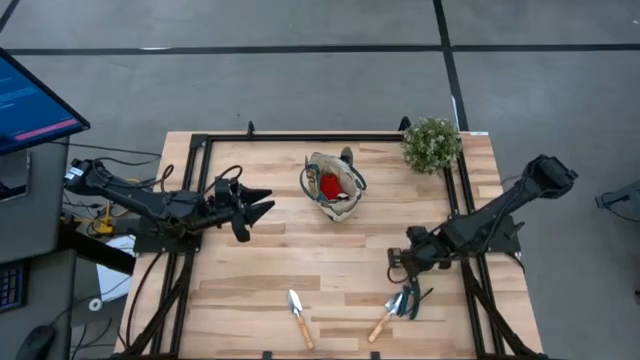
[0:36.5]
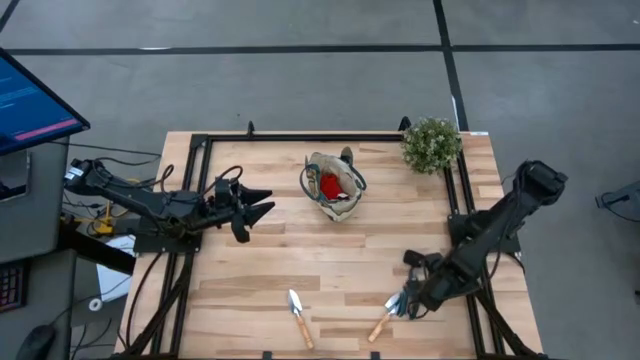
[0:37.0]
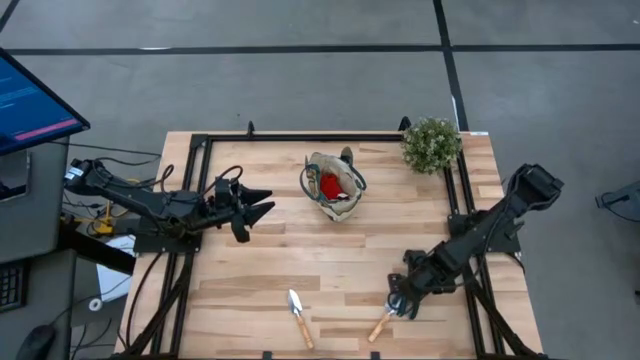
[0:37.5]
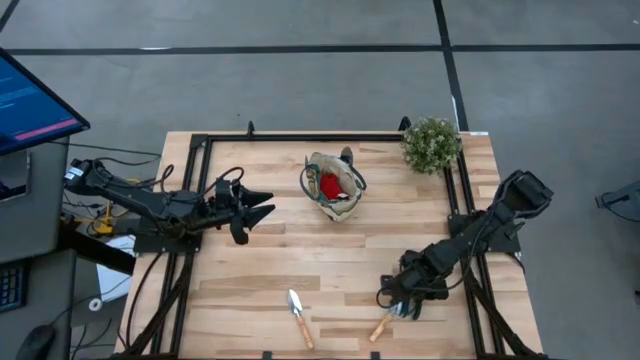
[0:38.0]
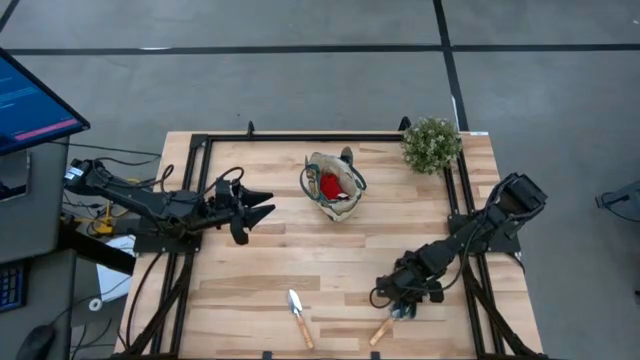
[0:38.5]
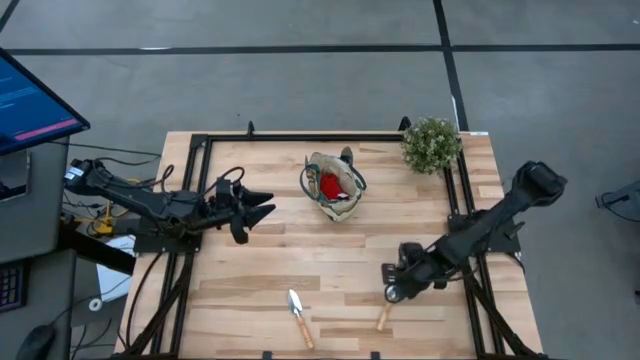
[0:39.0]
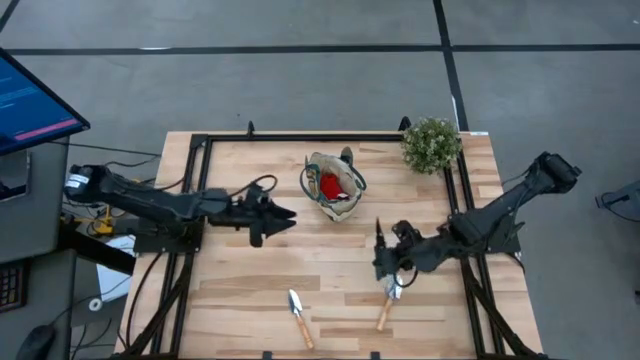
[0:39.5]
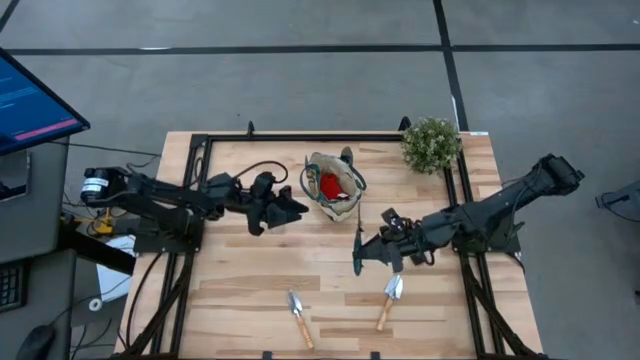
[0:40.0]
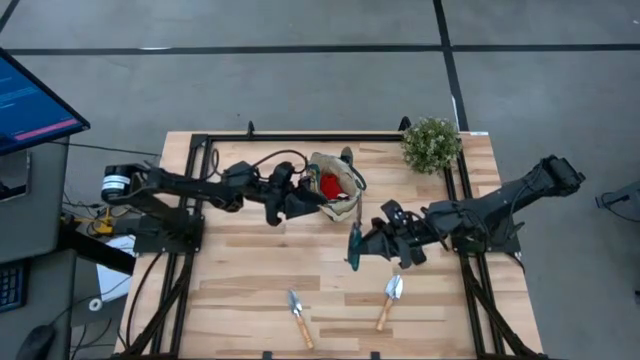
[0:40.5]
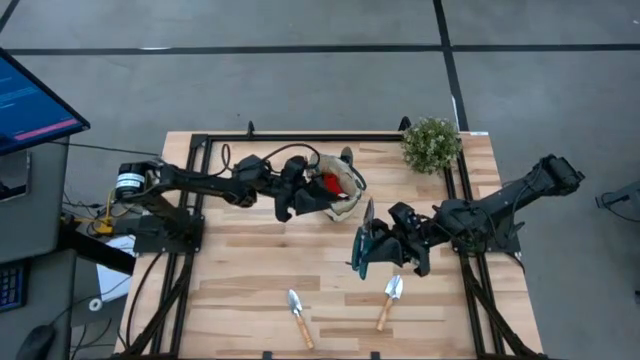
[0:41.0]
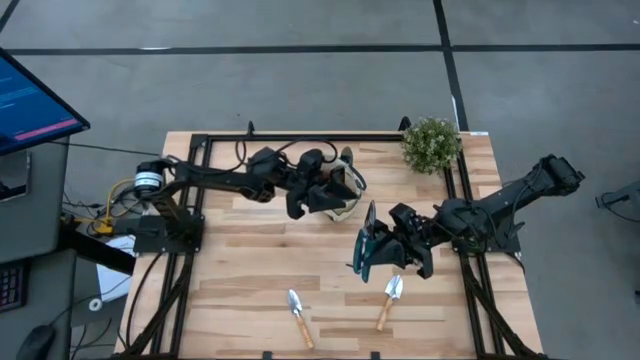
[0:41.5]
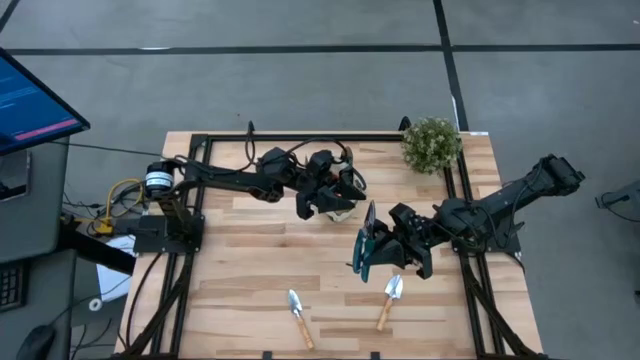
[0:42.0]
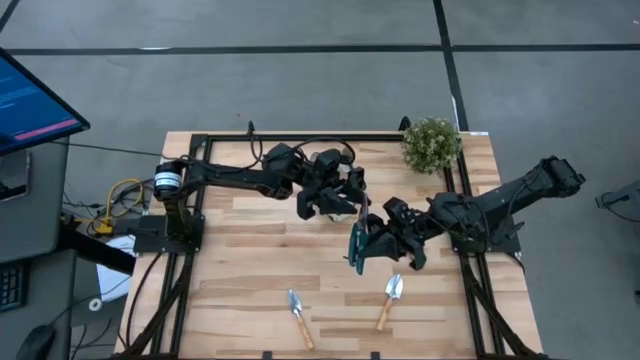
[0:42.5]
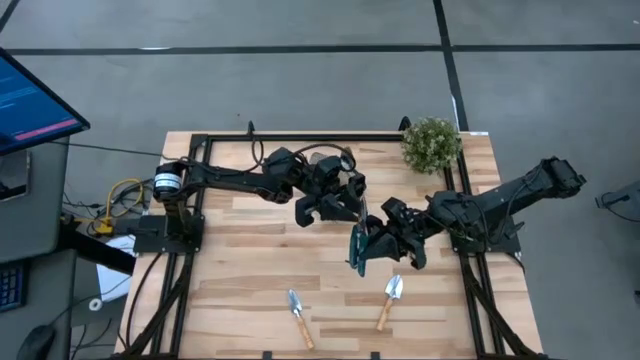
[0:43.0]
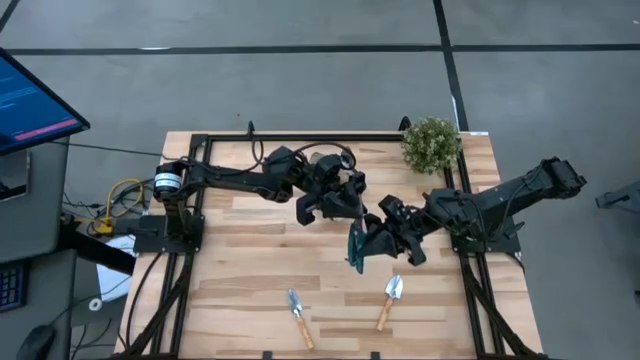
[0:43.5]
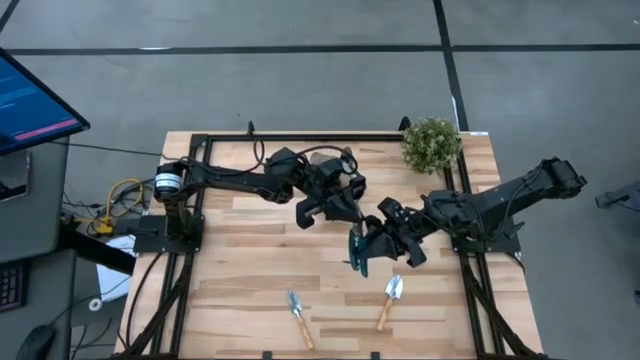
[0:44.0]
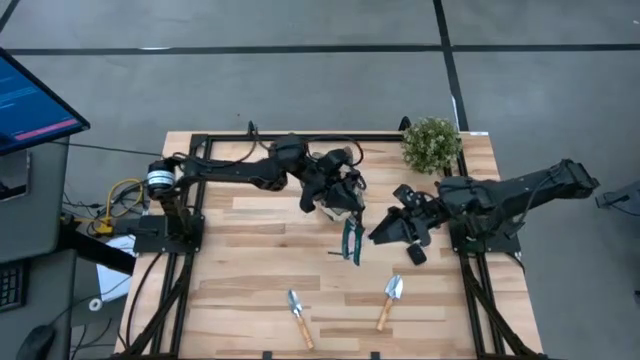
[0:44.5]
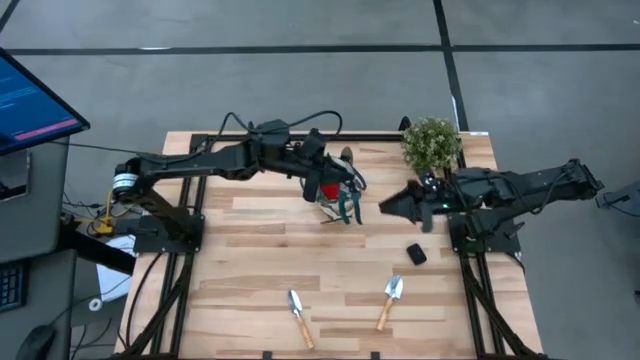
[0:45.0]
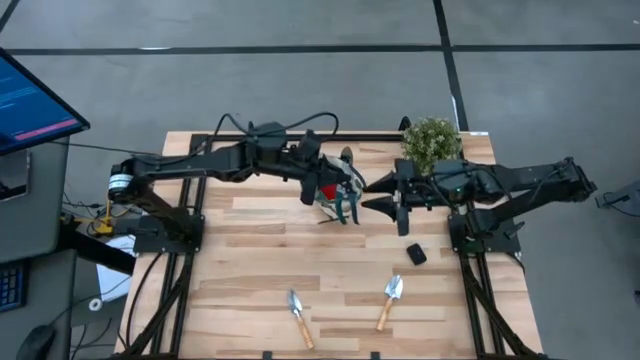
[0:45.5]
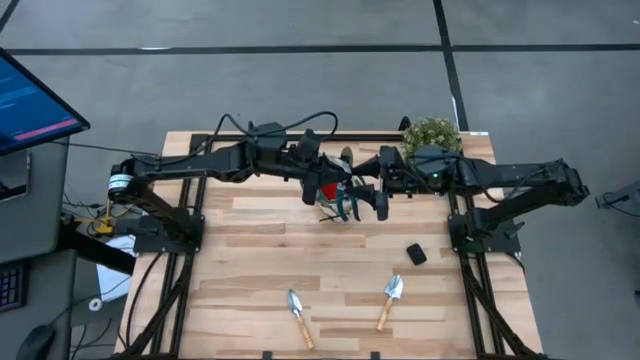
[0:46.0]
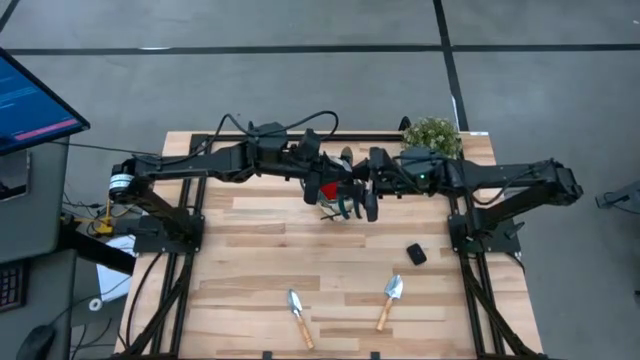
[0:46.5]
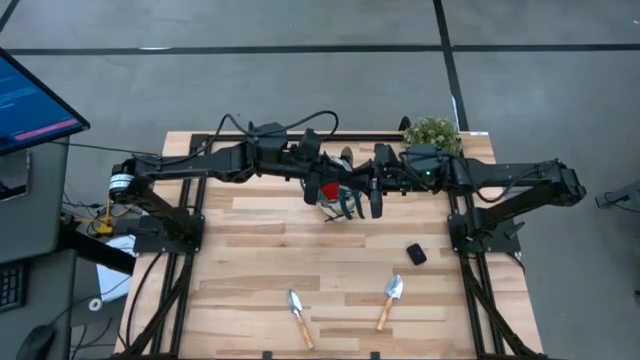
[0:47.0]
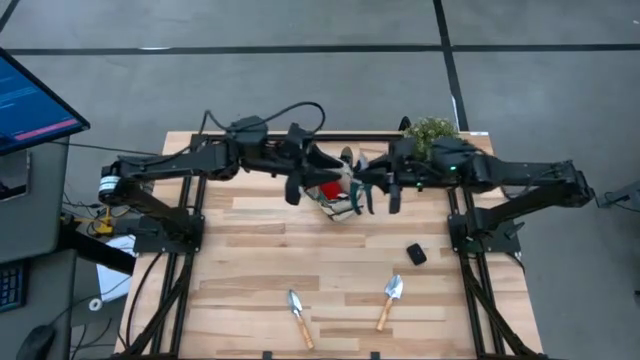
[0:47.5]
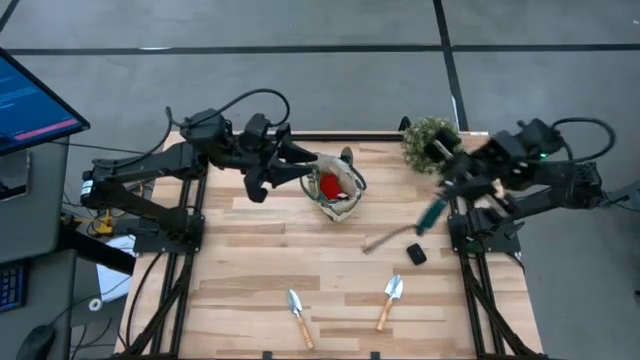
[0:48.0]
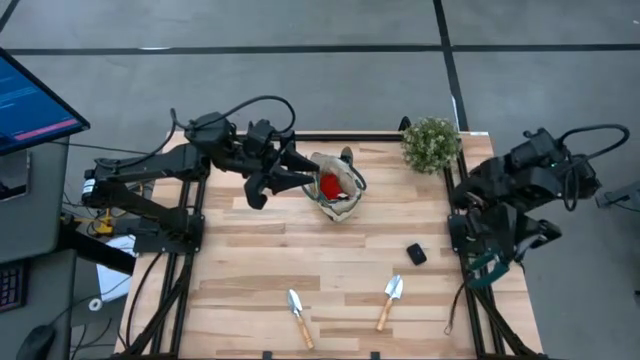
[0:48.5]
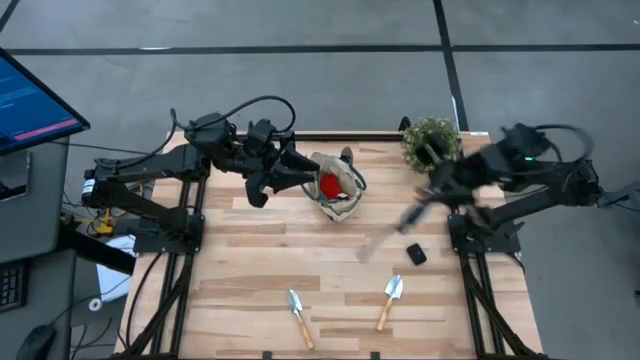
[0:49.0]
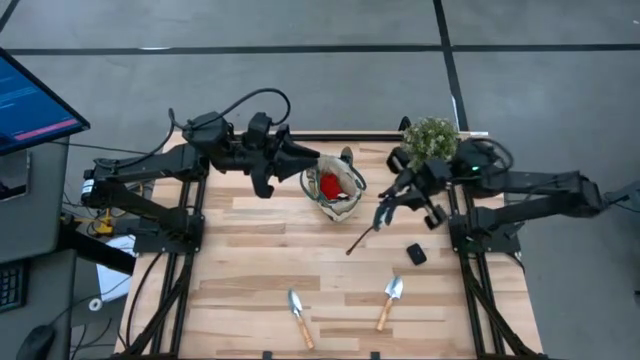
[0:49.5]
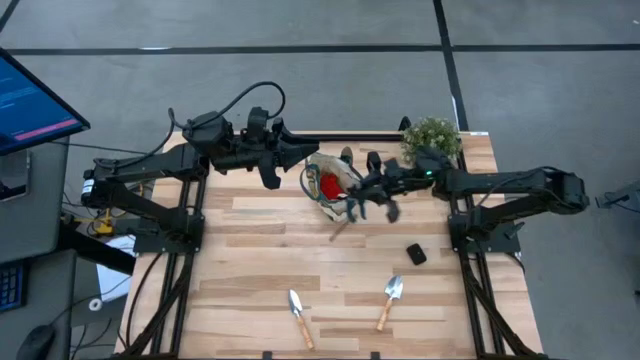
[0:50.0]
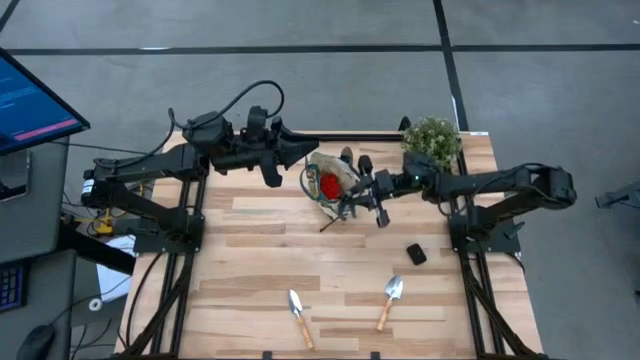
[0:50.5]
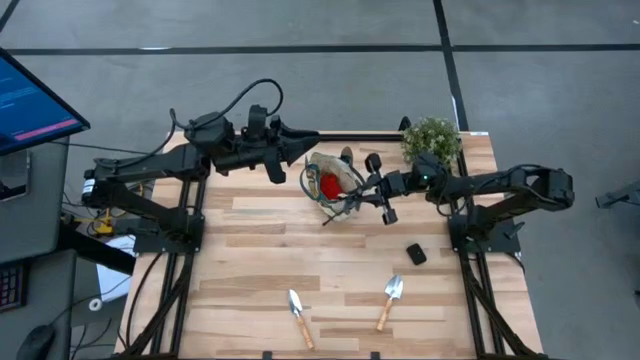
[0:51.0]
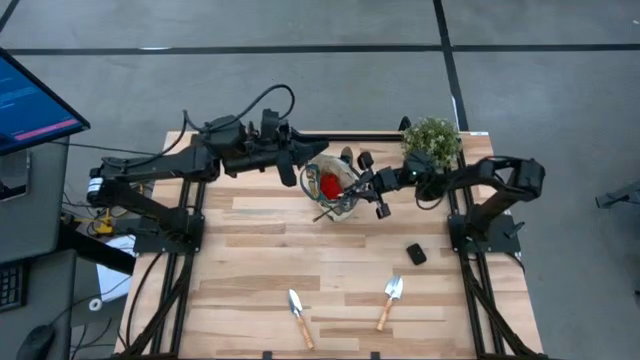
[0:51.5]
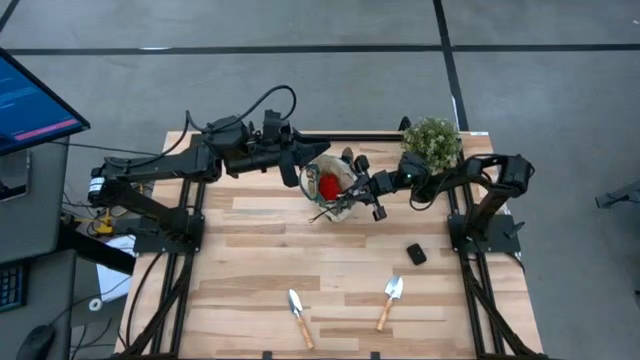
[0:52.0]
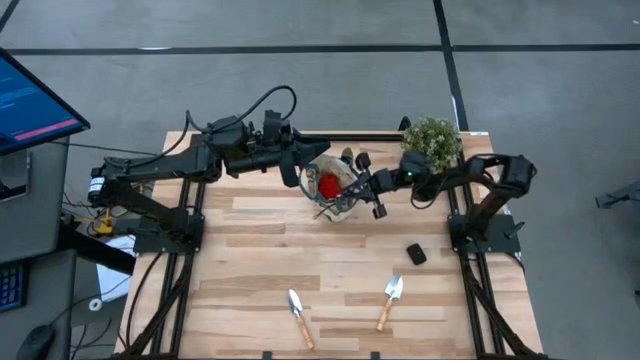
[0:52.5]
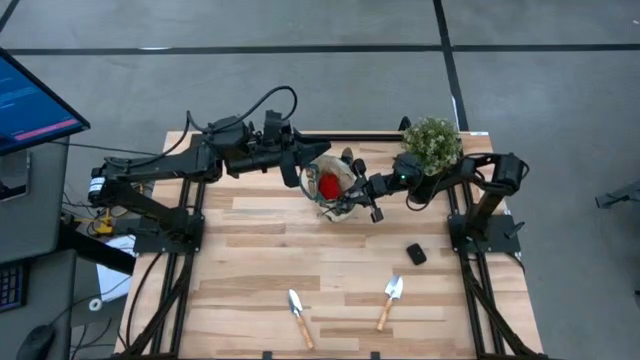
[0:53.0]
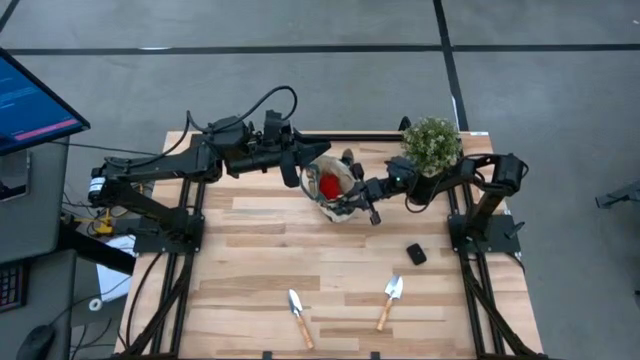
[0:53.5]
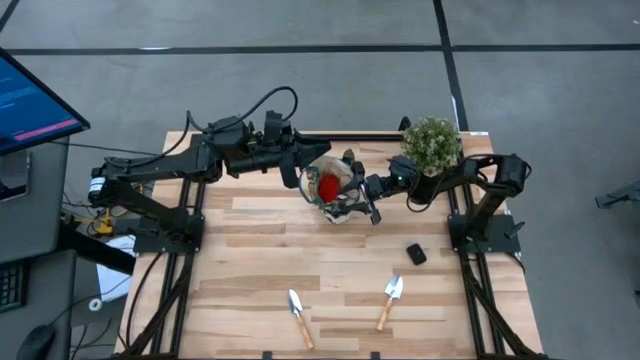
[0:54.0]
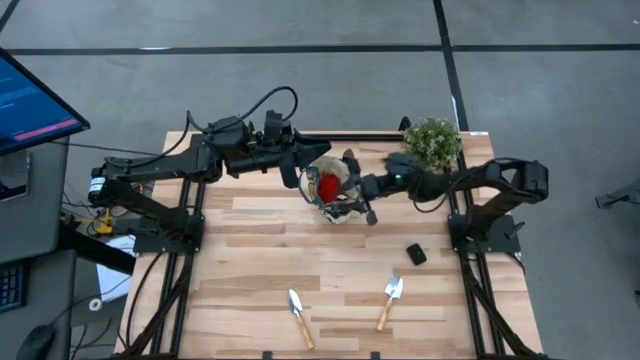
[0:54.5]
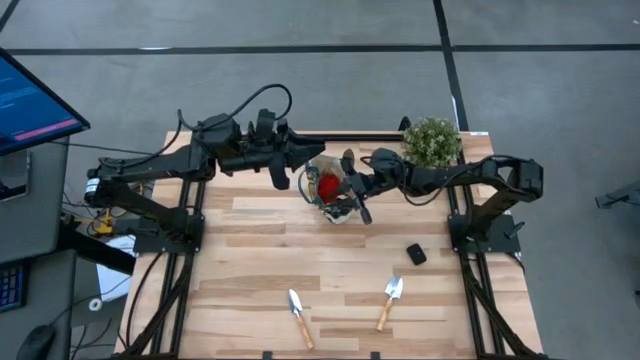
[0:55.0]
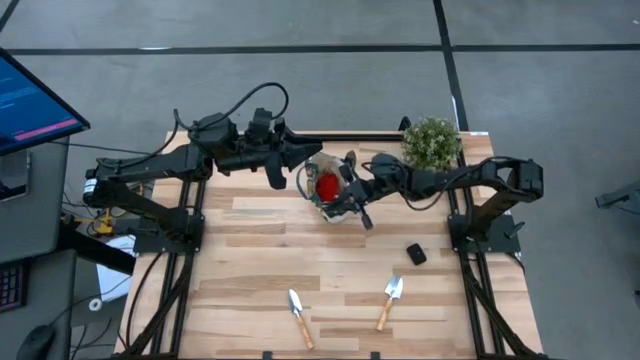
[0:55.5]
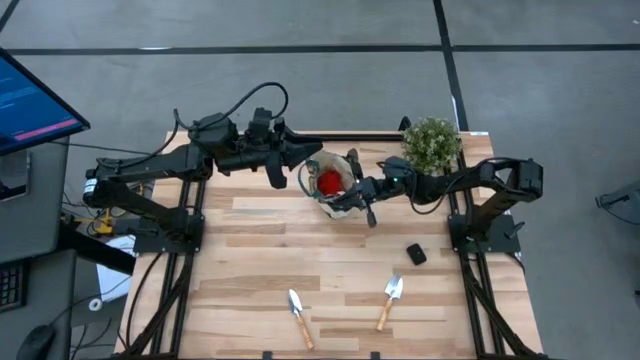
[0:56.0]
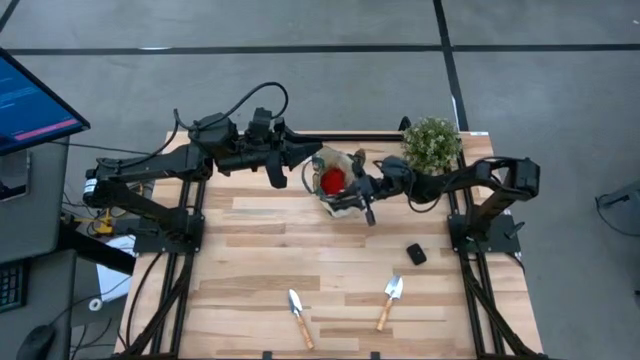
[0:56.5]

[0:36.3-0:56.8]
Task: Pick & Place Garden tools in Gardening bag
Put the green shear scissors into the green gardening bag

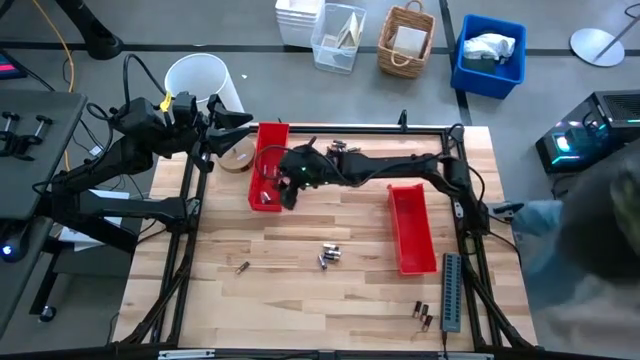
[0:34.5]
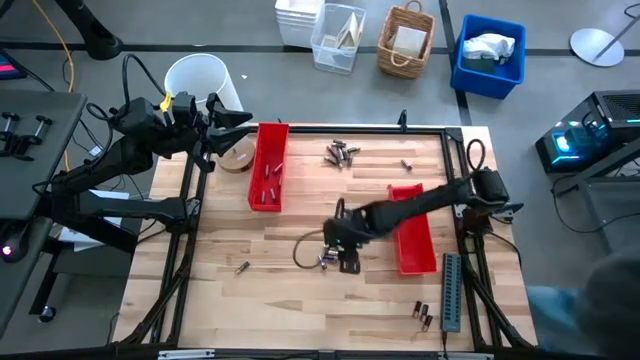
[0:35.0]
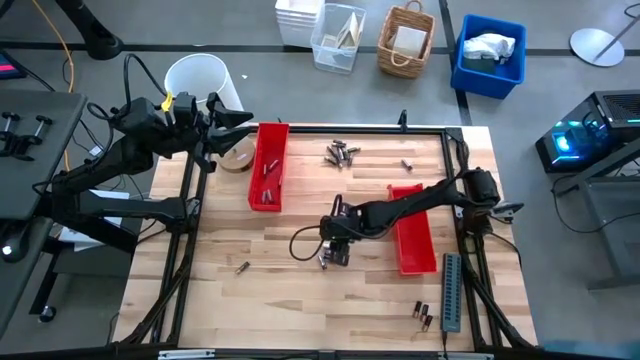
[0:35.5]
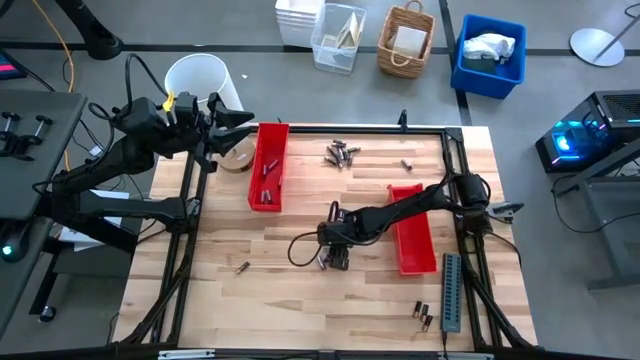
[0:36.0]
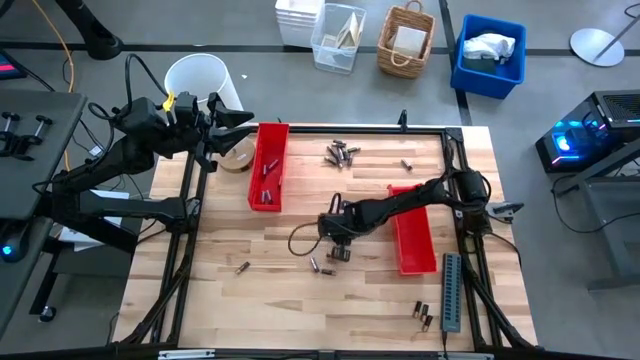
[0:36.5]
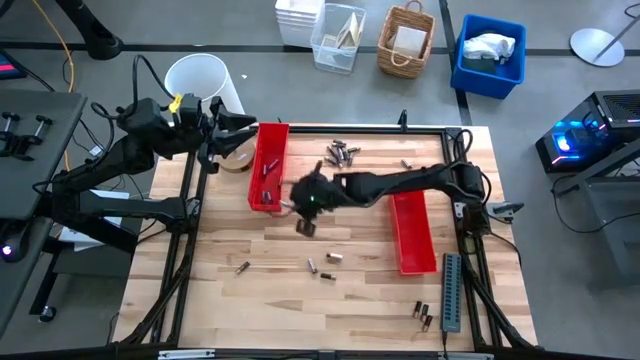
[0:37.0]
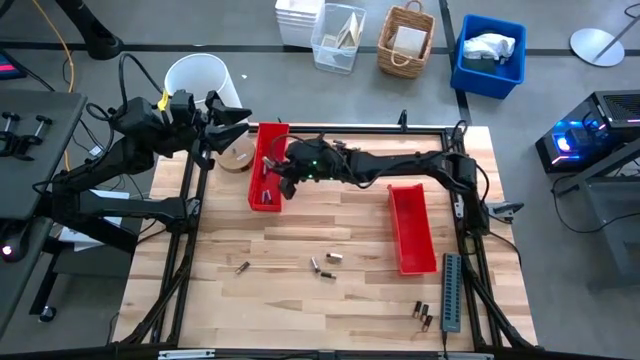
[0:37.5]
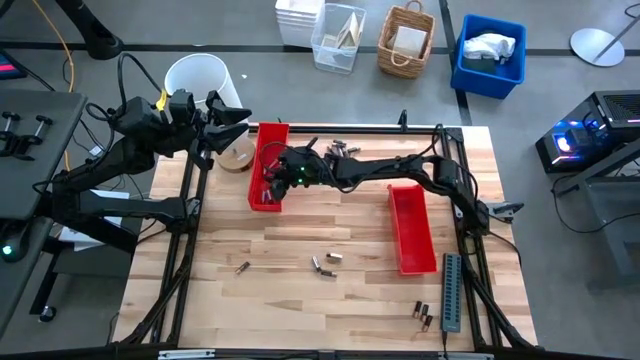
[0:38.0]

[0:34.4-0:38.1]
Task: Sort batteries
Put the silver battery into the top red bin
